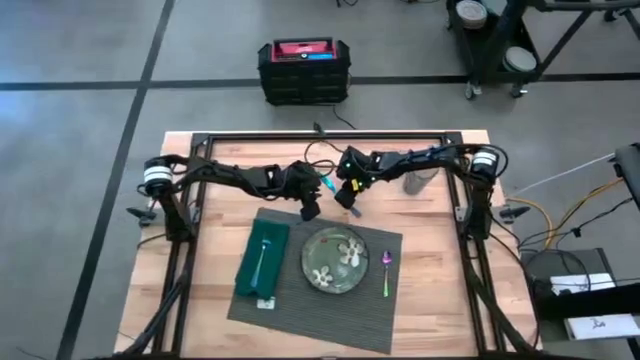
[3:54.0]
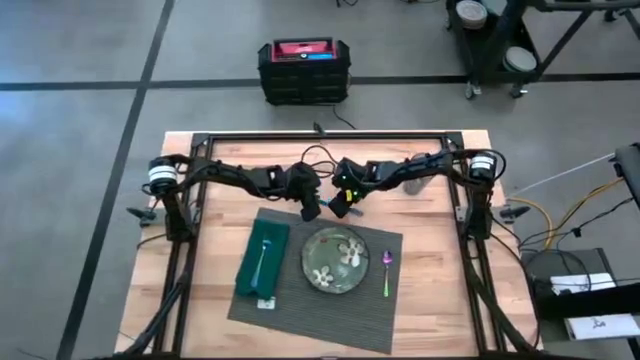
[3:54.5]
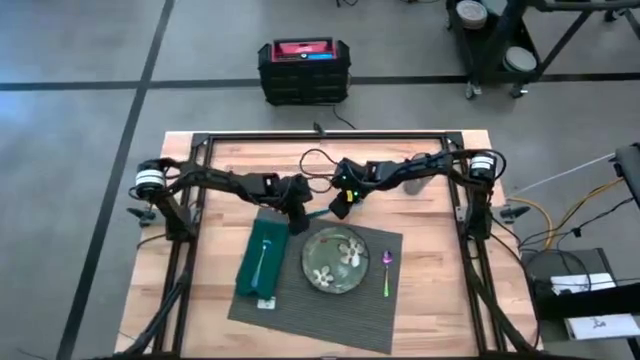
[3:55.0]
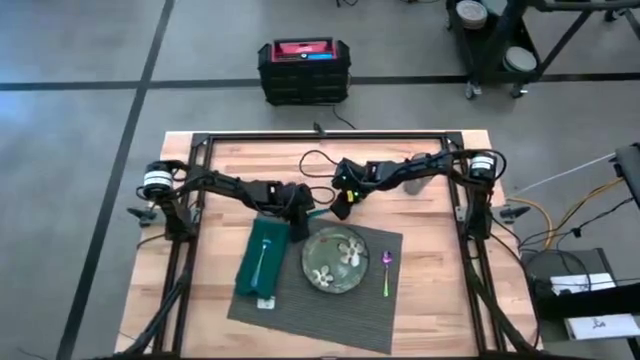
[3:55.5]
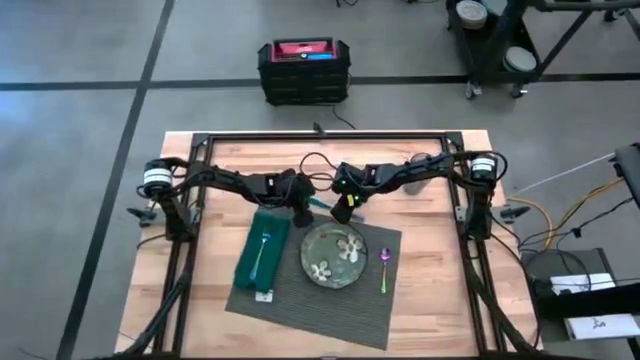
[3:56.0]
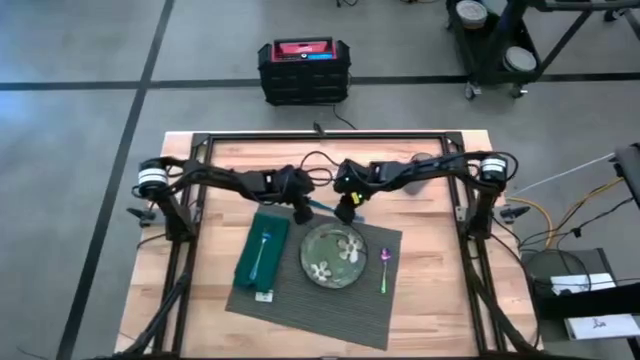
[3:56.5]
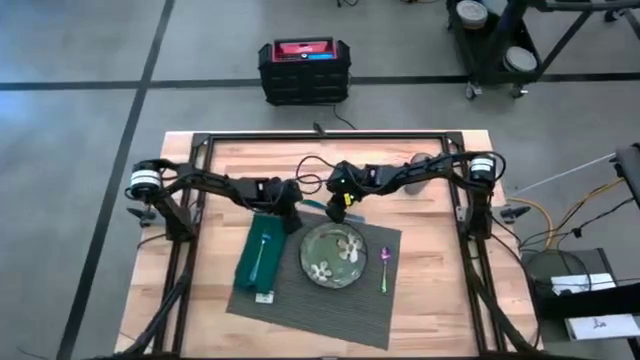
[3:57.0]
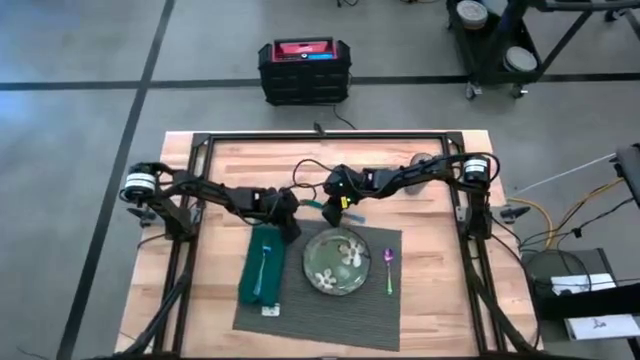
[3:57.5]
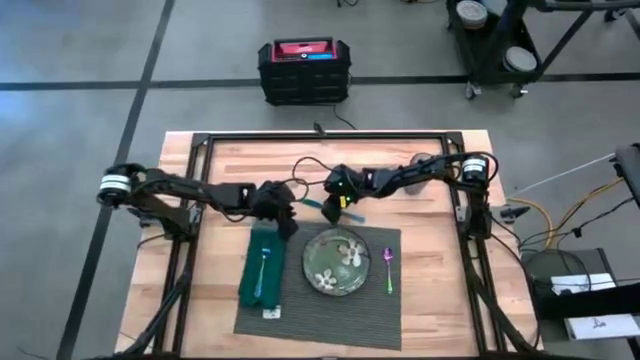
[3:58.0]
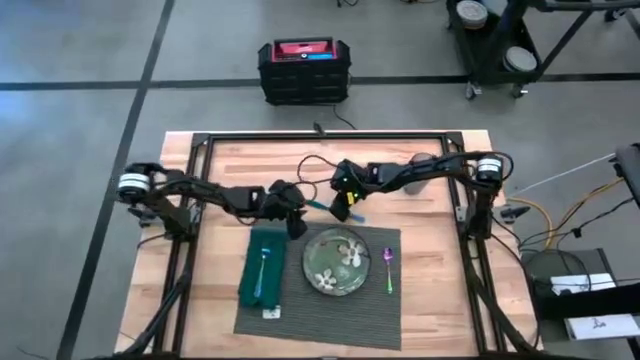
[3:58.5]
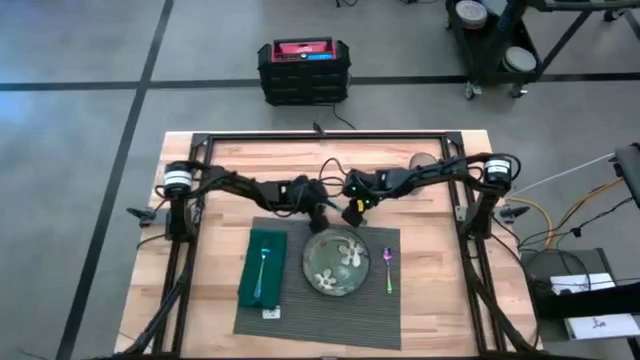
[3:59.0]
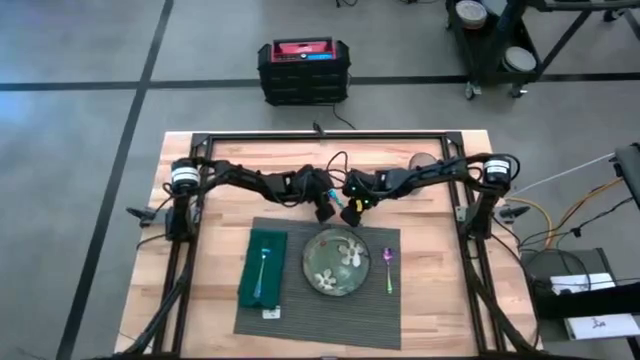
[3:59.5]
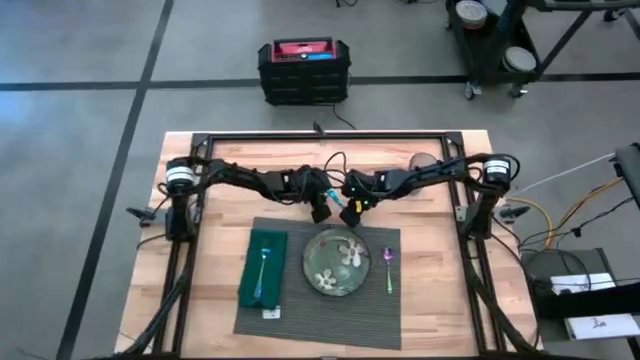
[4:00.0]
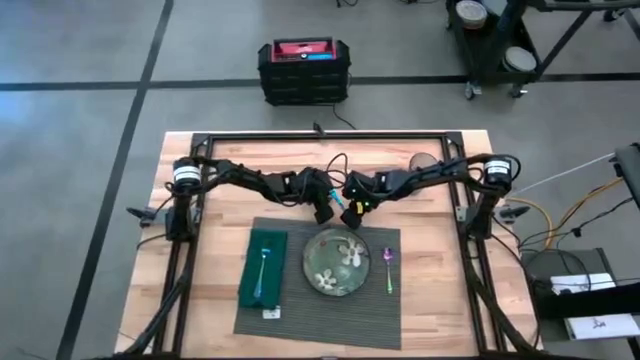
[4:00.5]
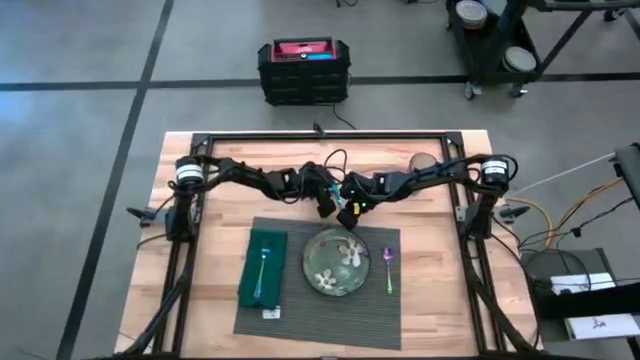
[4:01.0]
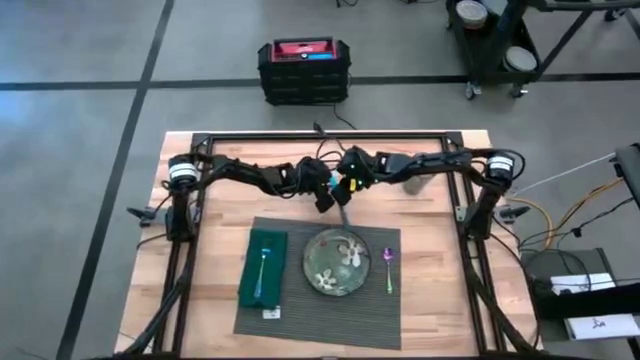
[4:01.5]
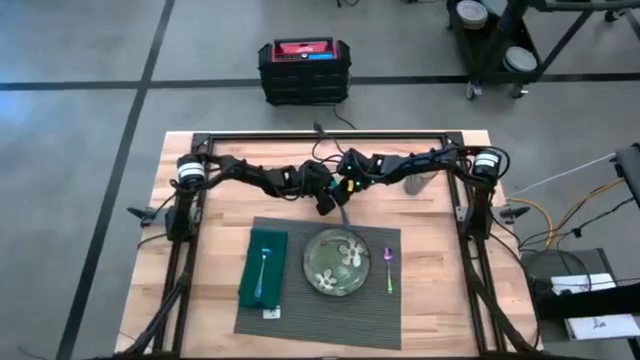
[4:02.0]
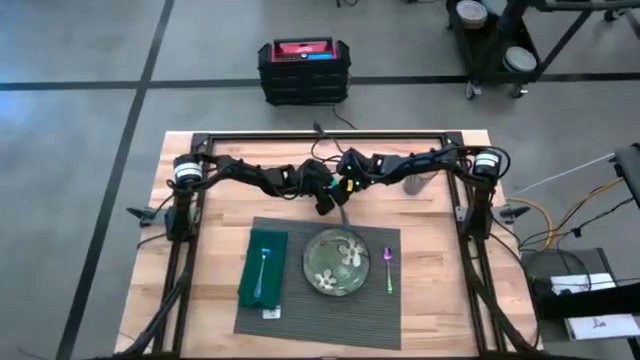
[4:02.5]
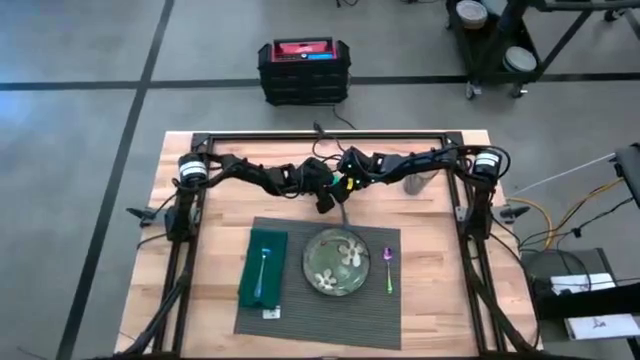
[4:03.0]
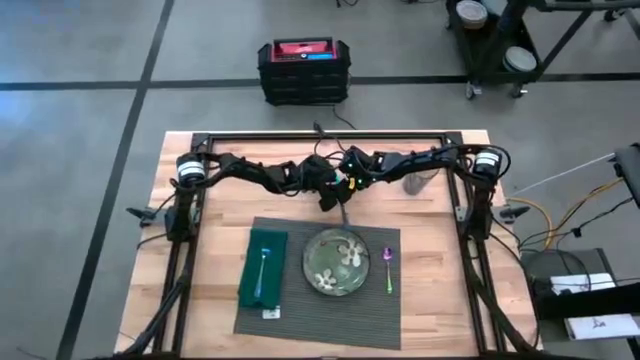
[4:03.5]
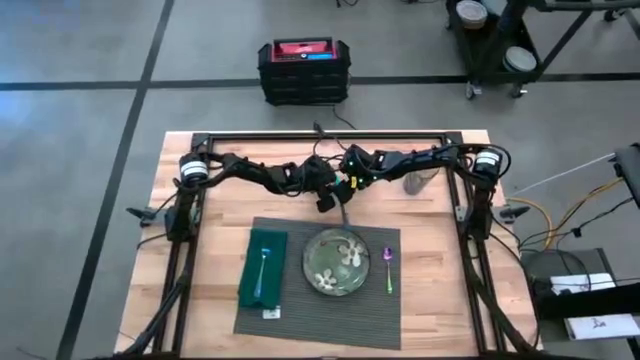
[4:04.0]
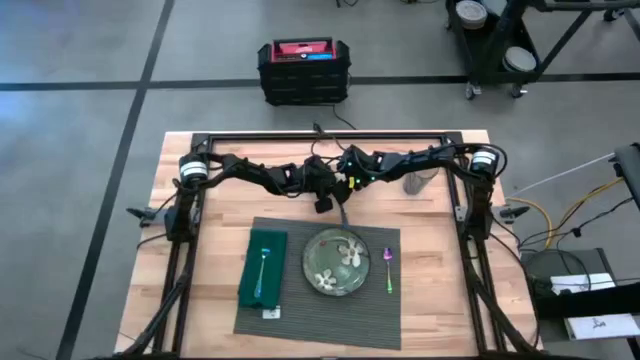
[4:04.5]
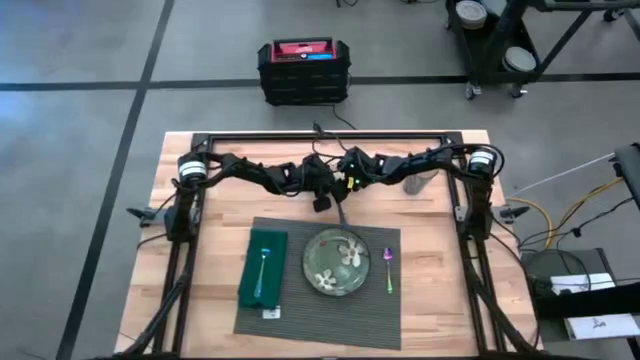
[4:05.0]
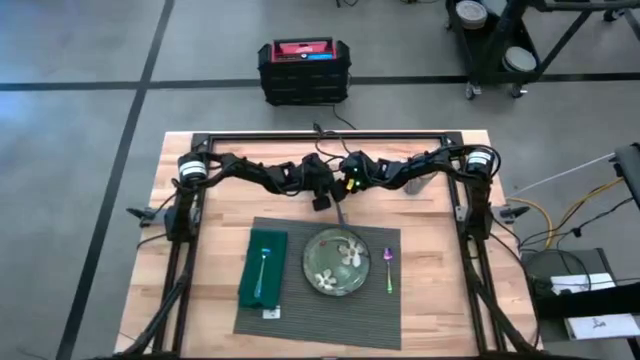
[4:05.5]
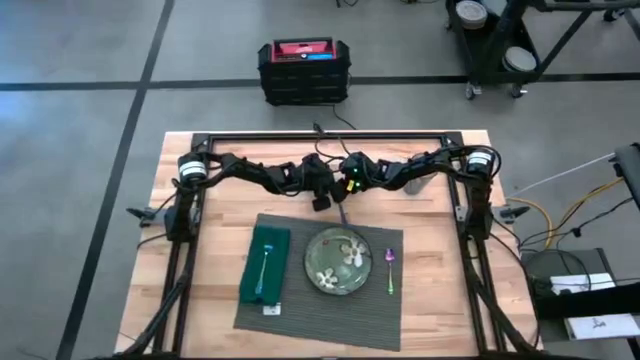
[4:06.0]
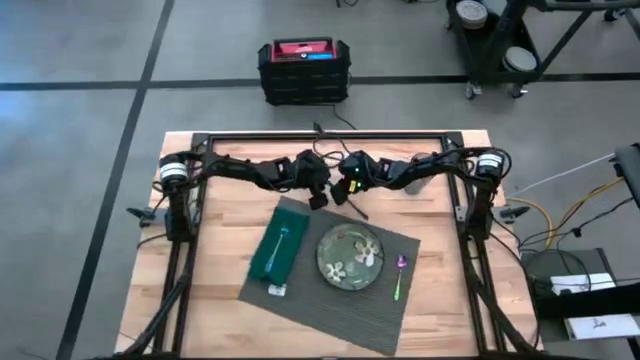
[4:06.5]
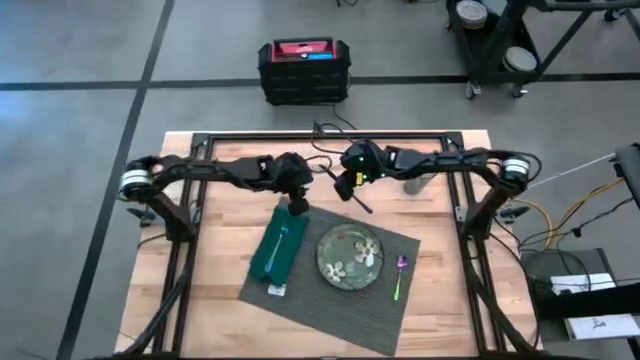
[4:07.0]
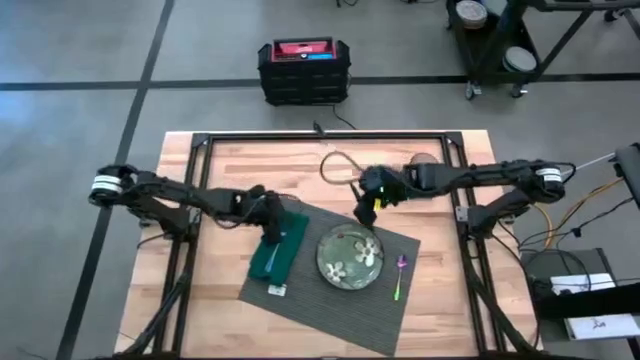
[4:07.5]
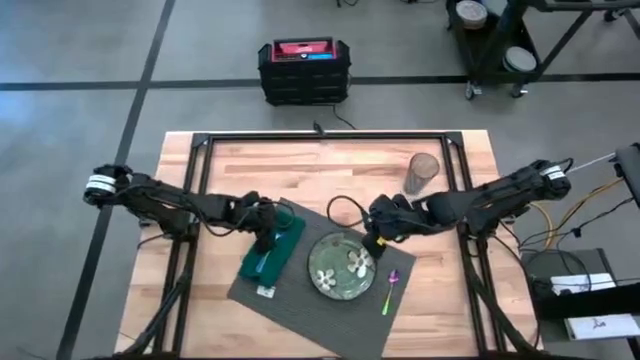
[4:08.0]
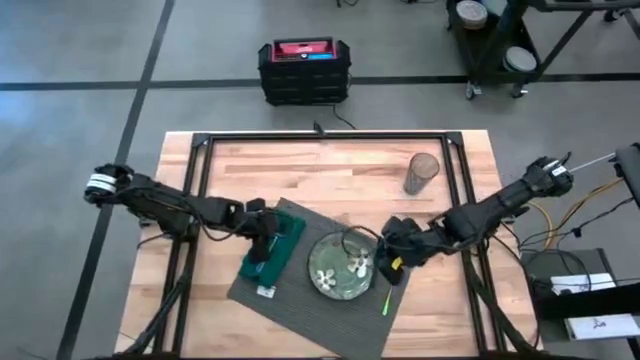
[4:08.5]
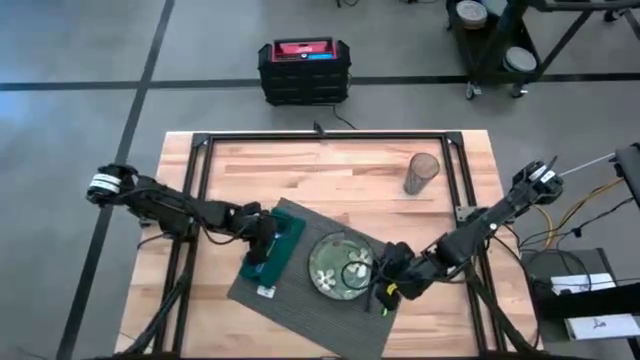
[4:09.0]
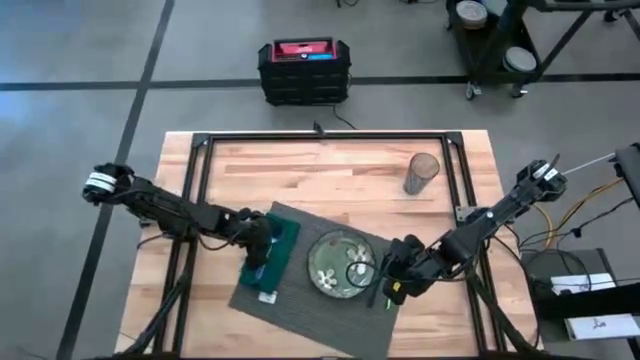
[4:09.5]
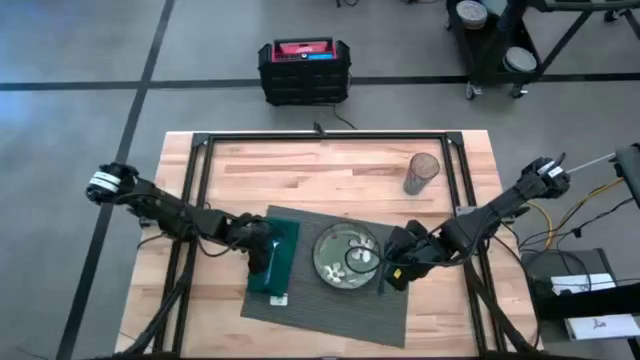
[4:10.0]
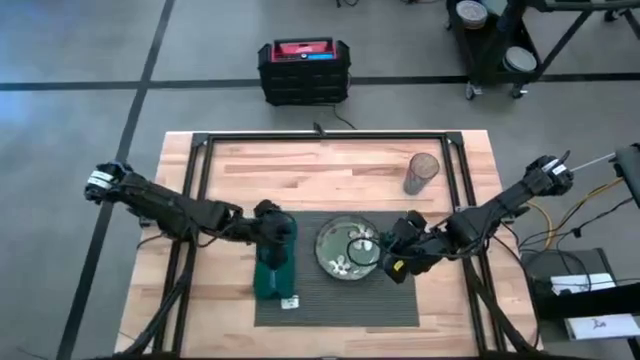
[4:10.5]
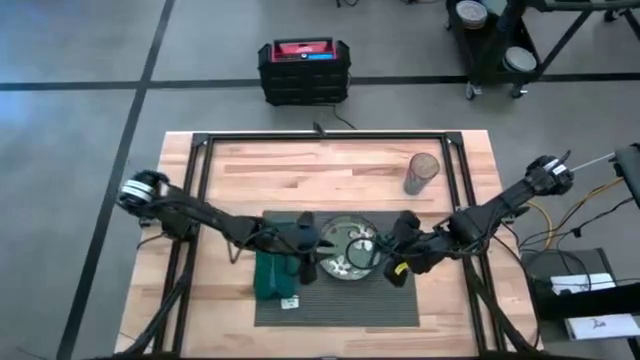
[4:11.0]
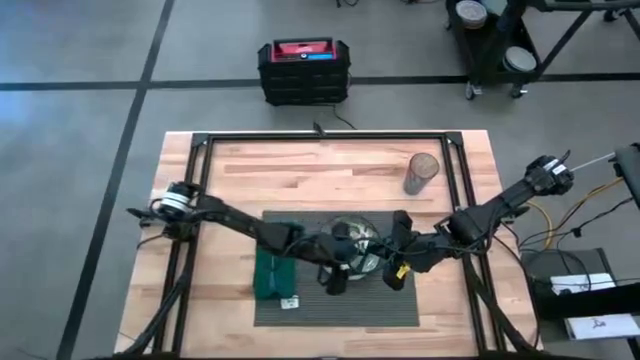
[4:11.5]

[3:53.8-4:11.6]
Task: Set table place
Put the iridescent blue knife on the gray place mat

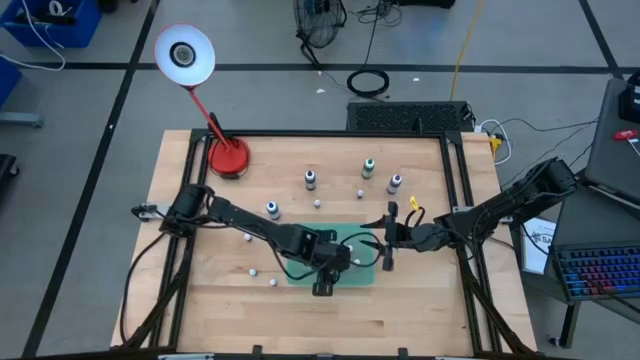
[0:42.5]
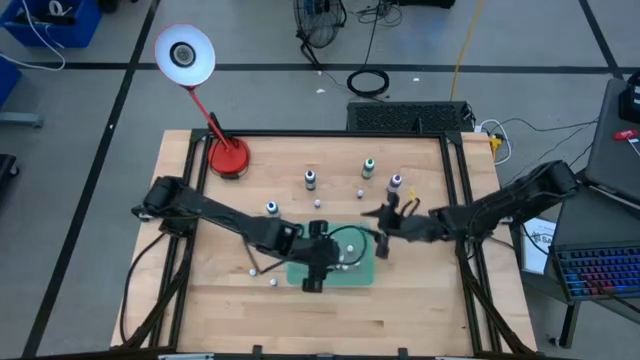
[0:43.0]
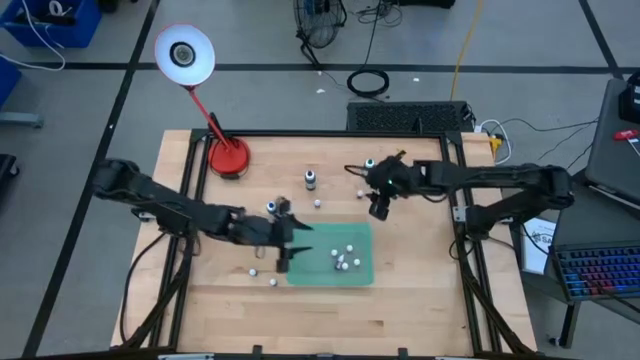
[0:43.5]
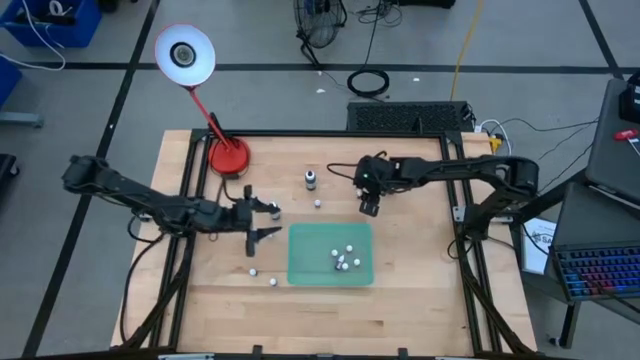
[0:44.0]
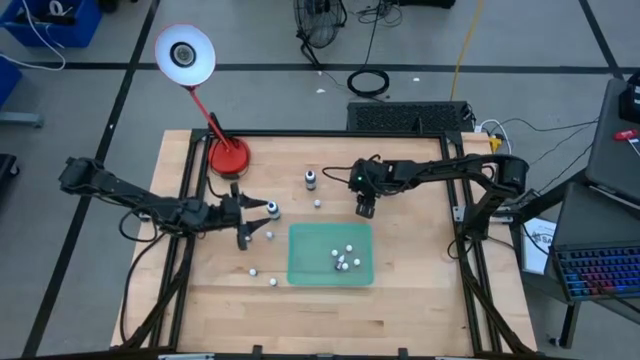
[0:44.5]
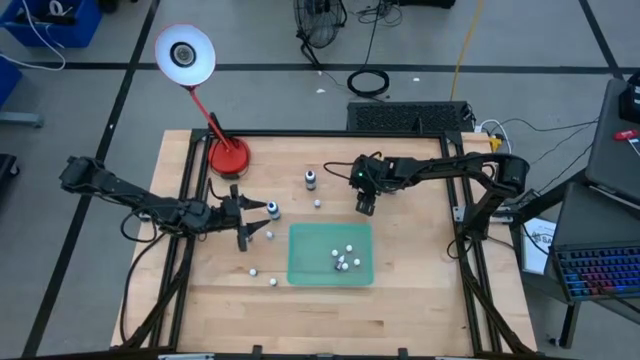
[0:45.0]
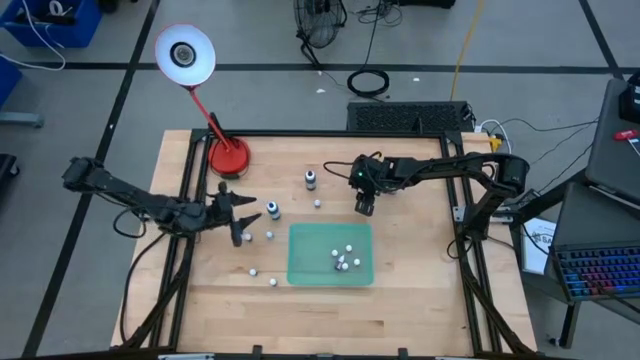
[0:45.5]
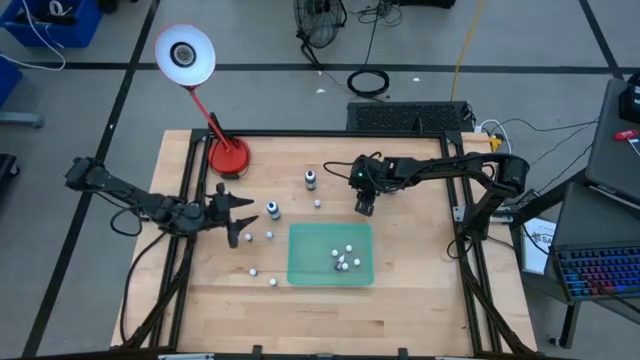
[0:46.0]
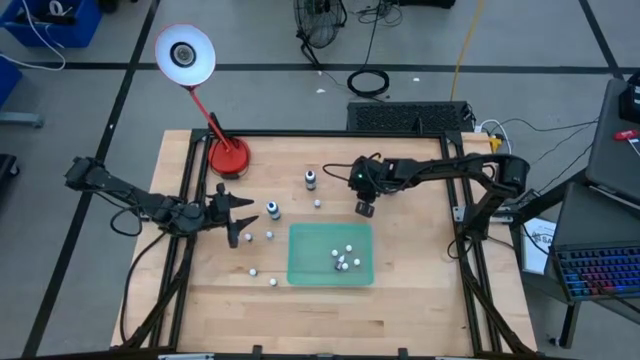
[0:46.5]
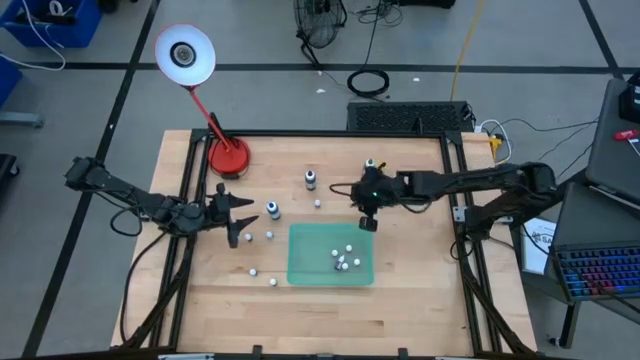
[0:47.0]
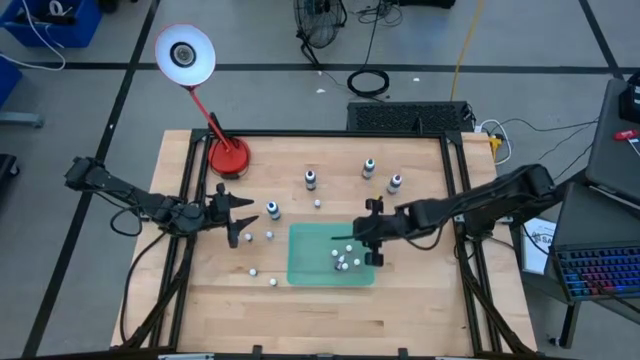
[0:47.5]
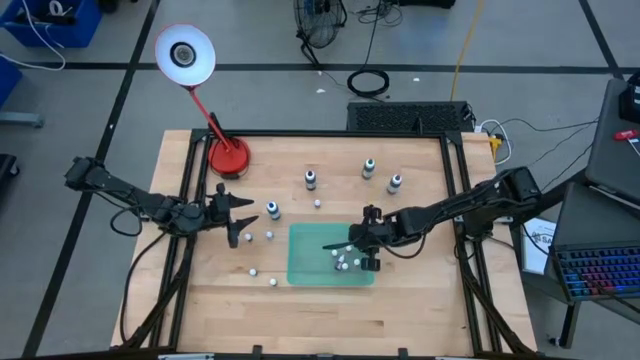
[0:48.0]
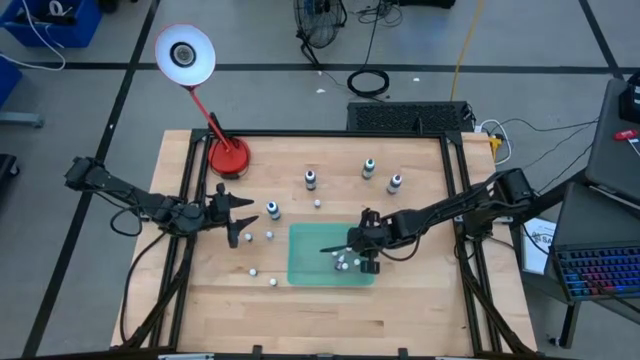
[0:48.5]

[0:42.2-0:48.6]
Task: Pick & Place food coloring
Put the small blue food coloring bottle into the green bin
